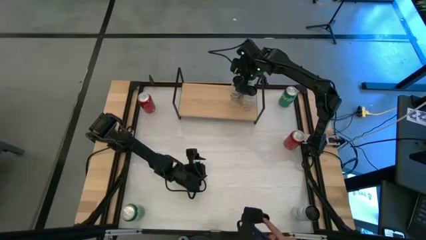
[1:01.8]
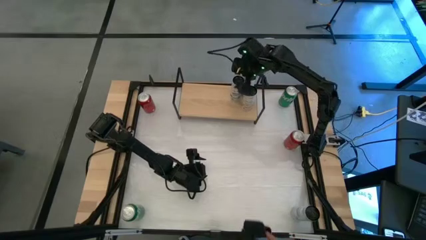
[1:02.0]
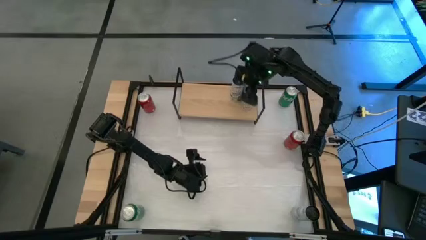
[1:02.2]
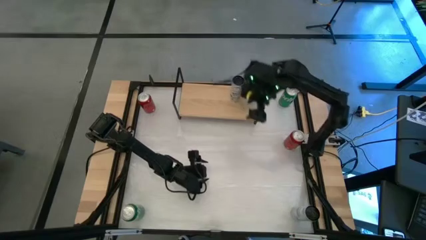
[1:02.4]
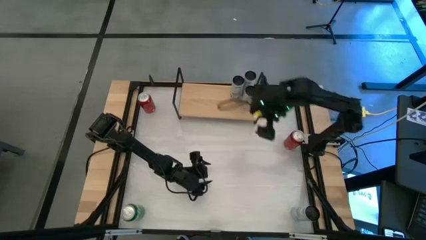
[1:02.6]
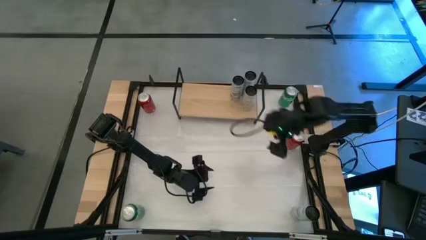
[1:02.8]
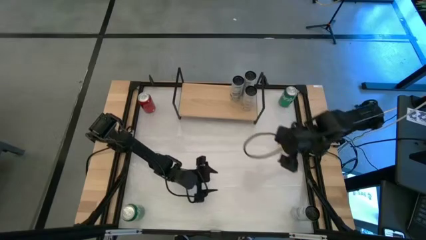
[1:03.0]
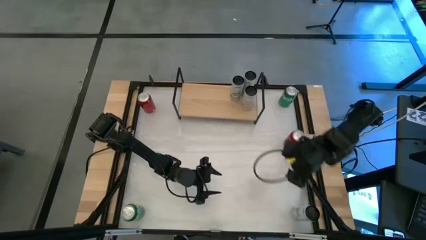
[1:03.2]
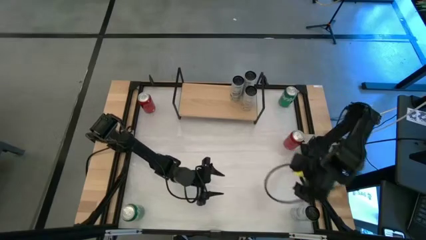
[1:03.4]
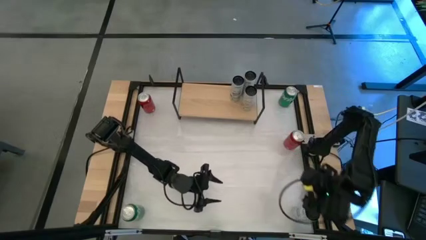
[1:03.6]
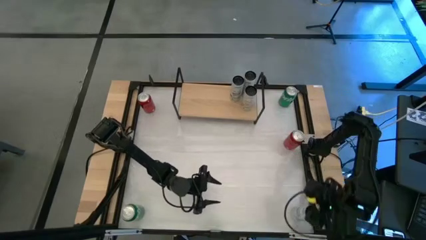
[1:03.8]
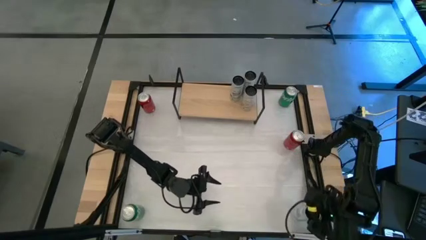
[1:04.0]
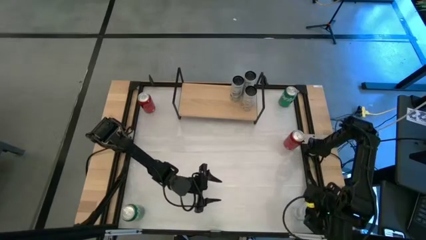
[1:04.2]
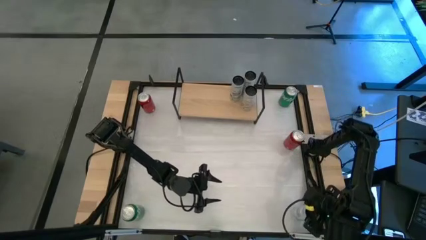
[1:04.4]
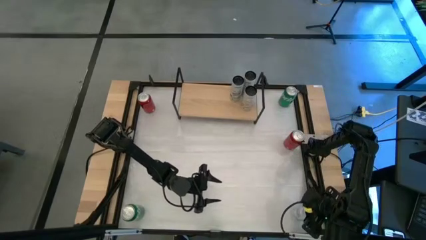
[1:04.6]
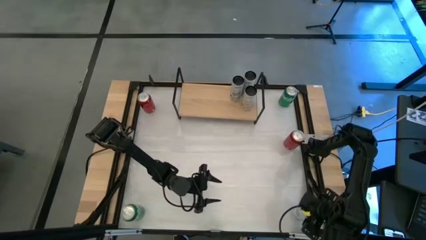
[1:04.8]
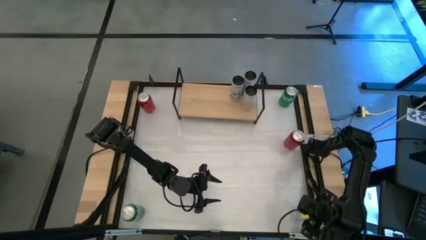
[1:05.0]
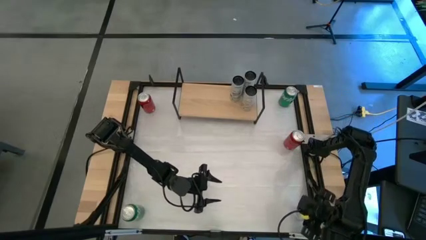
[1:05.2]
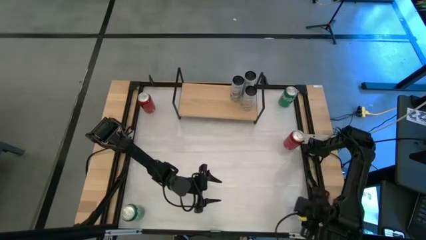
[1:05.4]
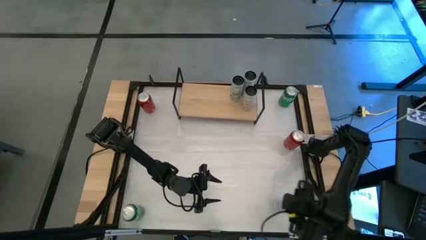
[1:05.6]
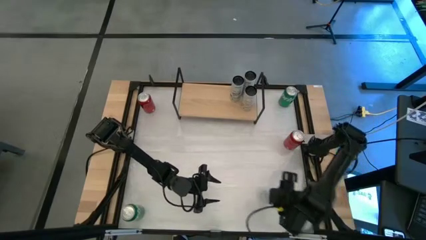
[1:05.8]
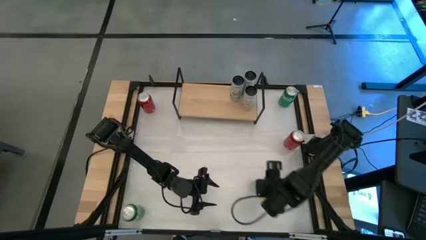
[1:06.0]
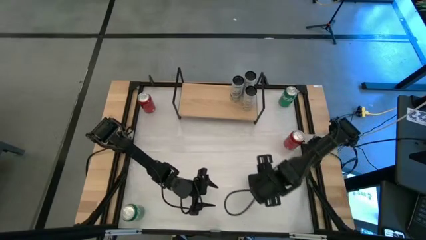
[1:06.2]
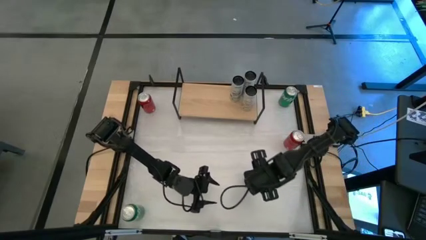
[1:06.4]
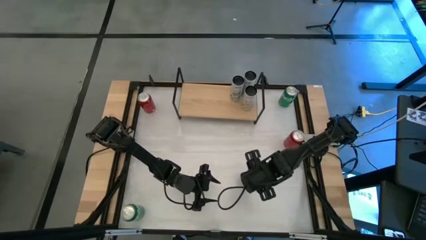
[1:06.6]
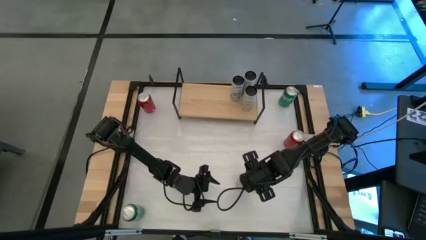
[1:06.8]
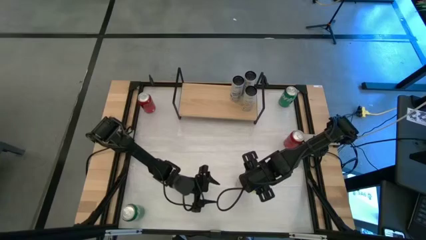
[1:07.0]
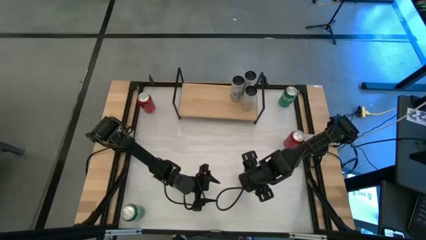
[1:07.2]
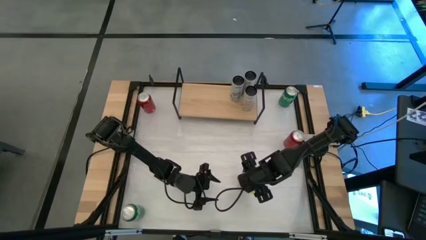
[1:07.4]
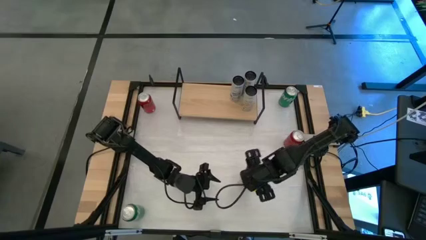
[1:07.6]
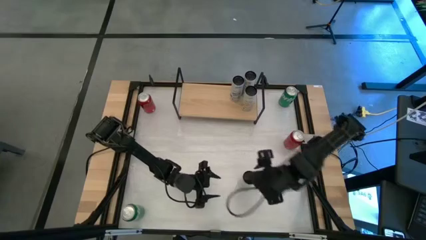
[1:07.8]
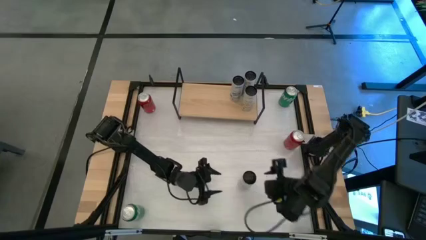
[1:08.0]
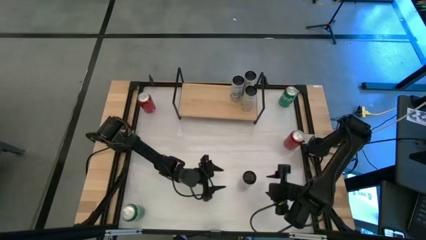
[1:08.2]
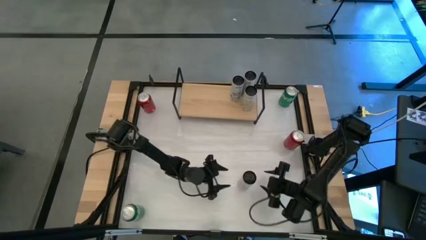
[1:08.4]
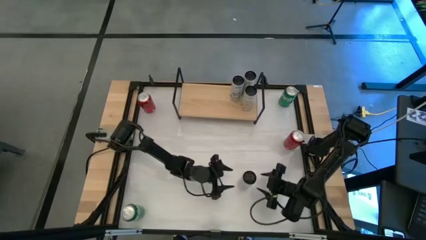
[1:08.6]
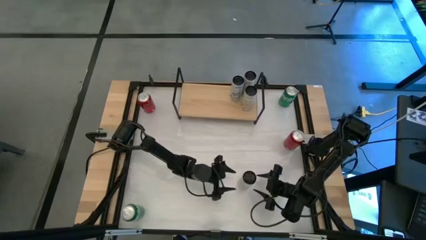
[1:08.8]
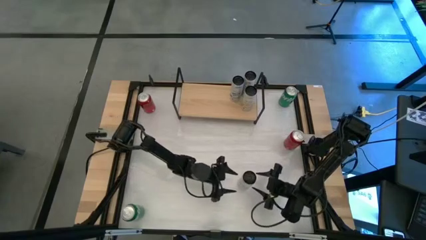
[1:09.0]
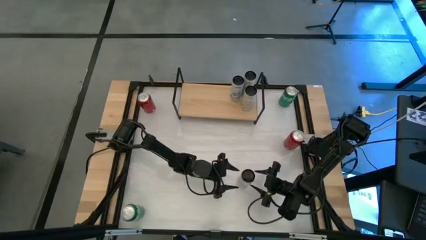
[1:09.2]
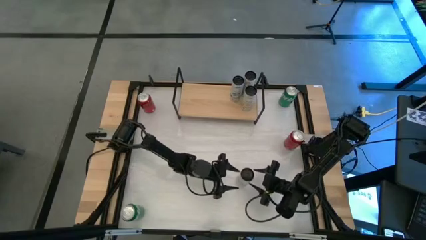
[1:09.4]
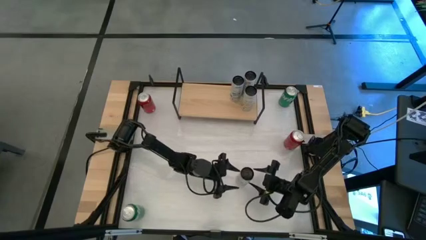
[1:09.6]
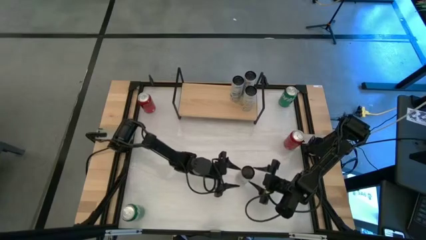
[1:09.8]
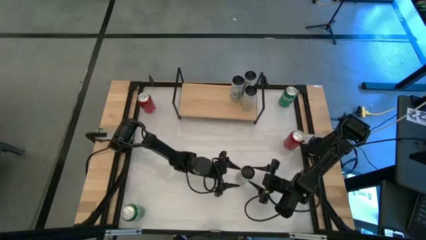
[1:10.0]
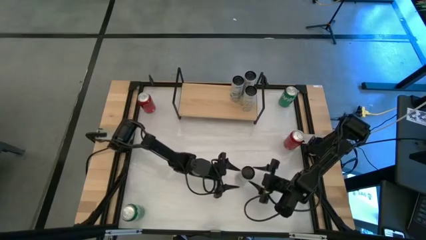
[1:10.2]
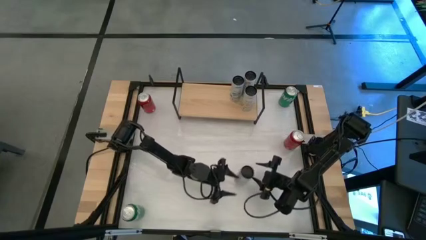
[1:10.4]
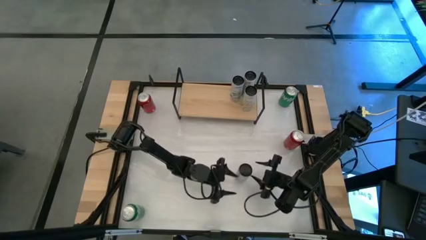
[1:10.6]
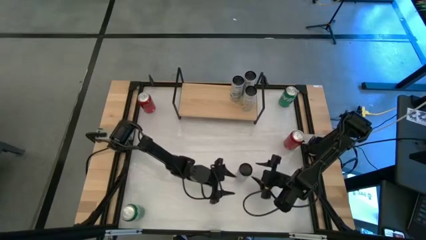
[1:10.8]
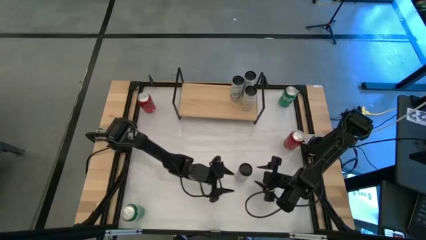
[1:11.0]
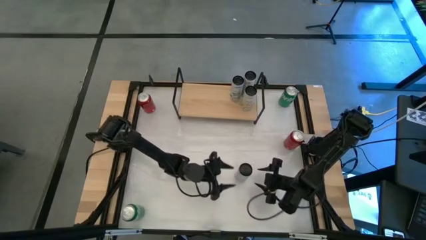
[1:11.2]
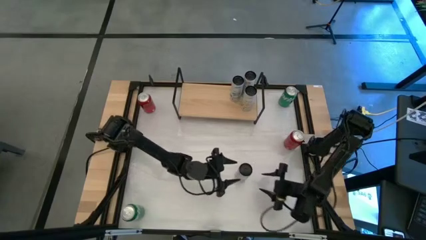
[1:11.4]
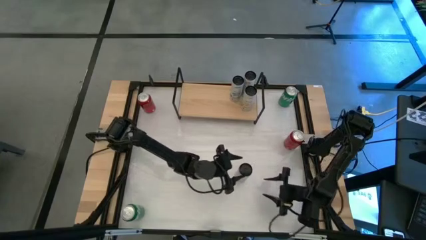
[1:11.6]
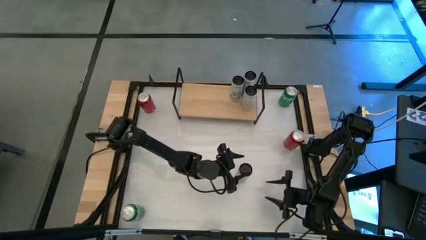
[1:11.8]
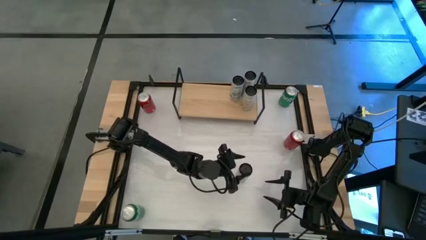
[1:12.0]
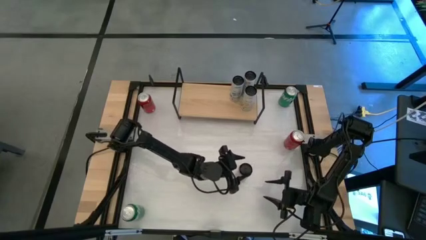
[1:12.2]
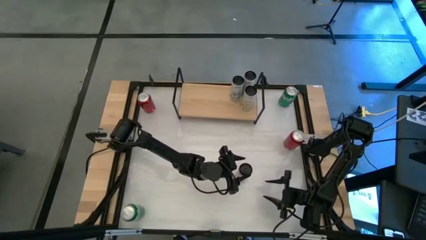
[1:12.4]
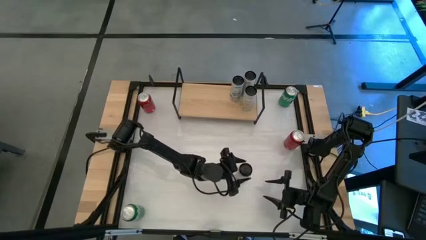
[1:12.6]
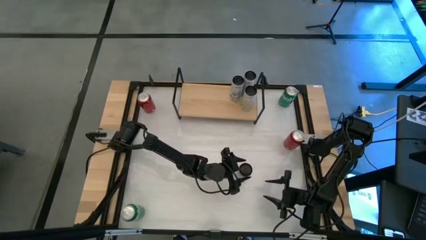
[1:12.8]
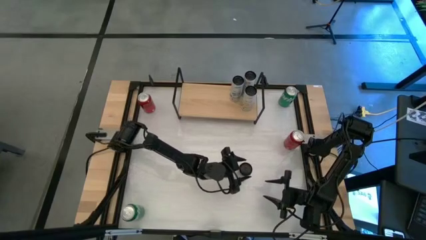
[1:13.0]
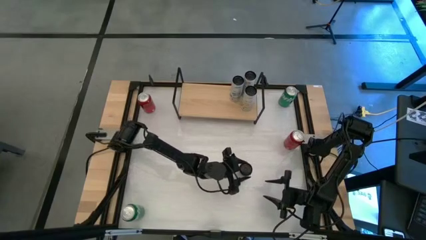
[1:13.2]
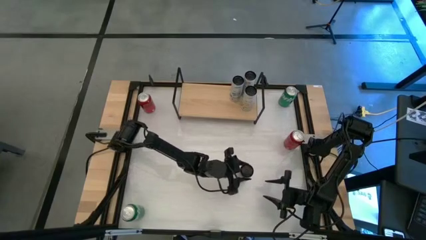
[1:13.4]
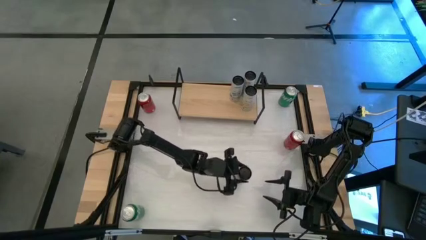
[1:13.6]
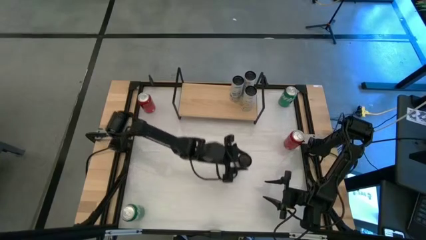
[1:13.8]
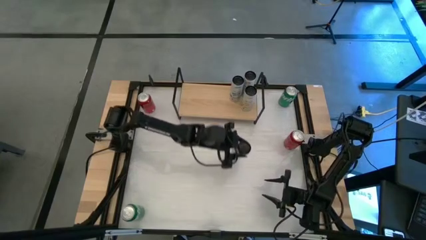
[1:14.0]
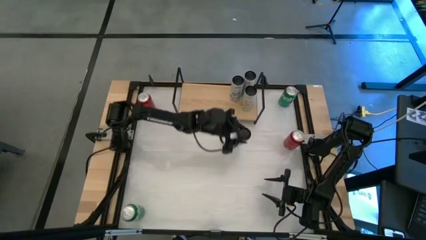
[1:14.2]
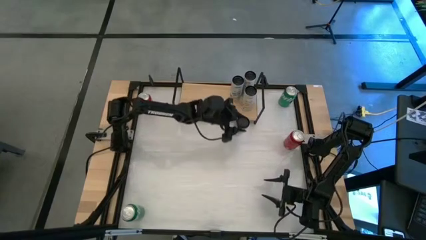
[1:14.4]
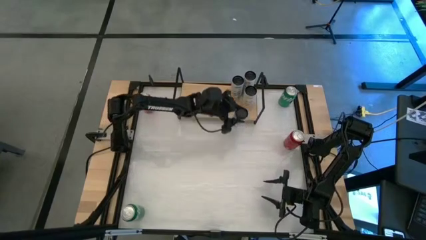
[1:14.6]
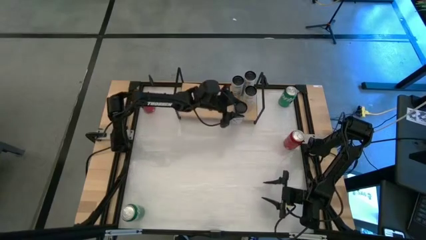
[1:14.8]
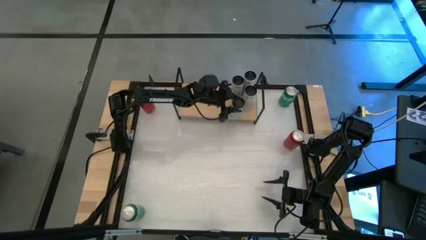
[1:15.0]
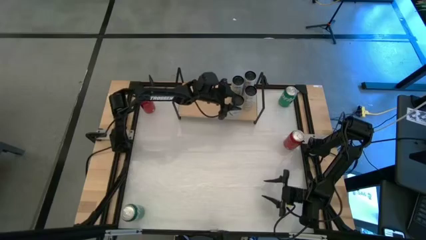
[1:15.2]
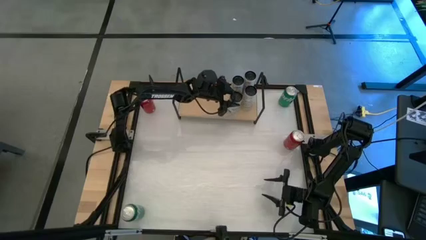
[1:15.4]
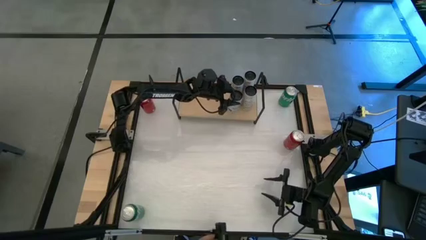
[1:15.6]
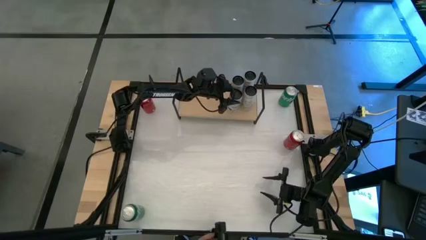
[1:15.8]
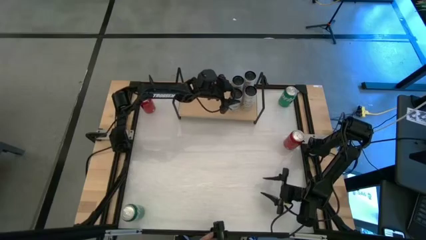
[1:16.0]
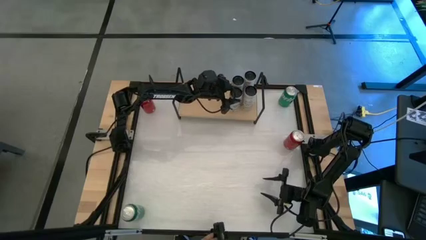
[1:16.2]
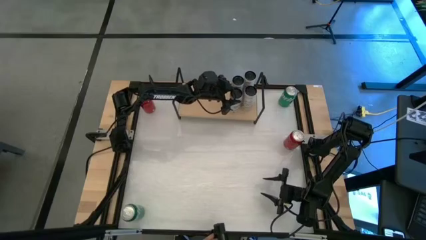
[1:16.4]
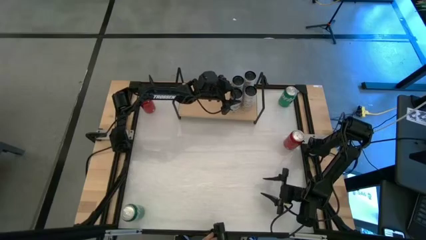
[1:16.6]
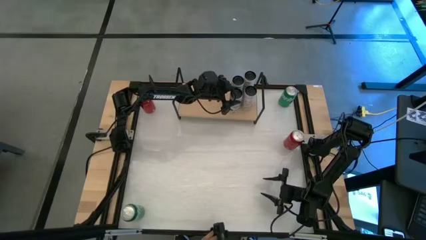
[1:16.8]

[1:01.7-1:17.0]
Task: Place canned beverage on shelf
Put the white blue soda can on the shelf aligned with the other white blue soda can
